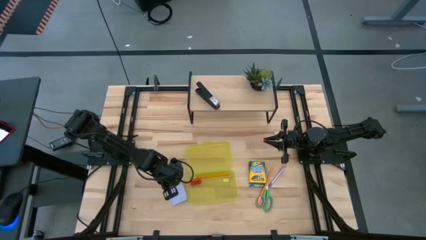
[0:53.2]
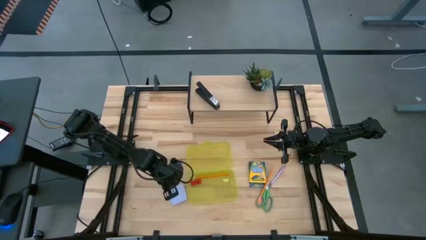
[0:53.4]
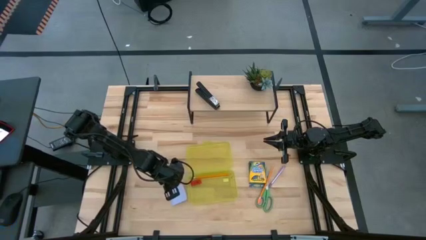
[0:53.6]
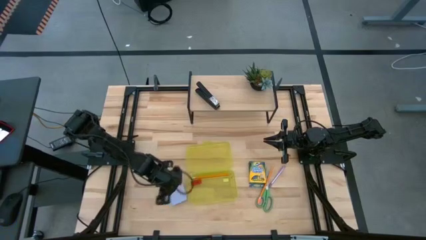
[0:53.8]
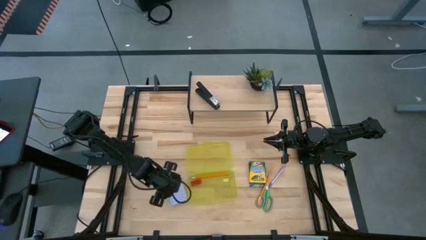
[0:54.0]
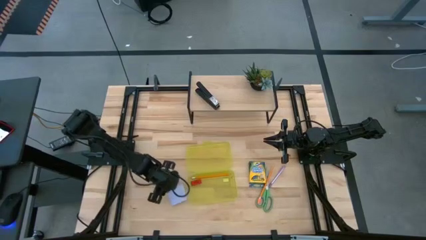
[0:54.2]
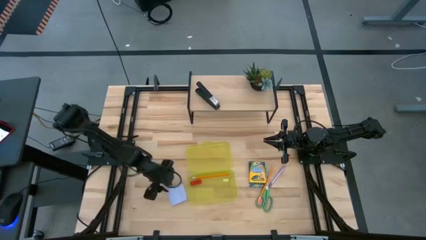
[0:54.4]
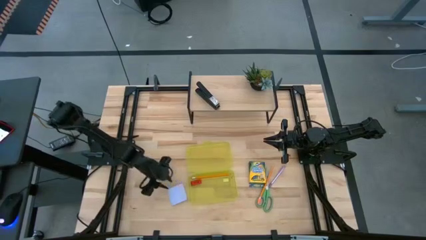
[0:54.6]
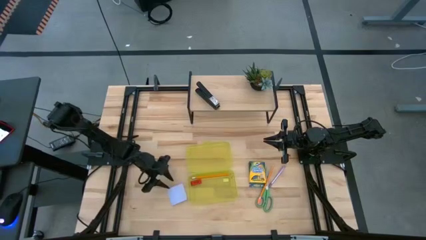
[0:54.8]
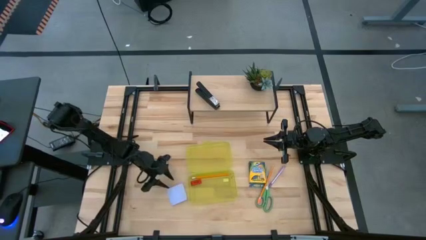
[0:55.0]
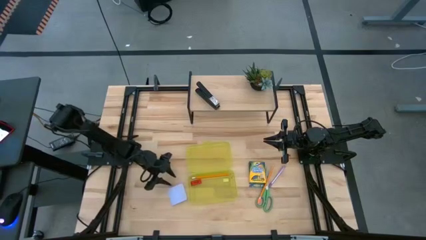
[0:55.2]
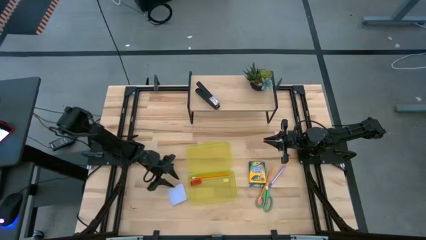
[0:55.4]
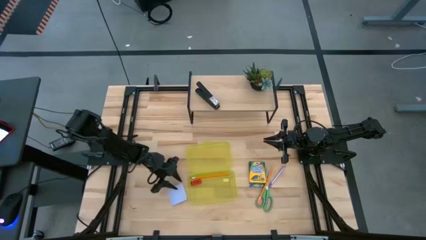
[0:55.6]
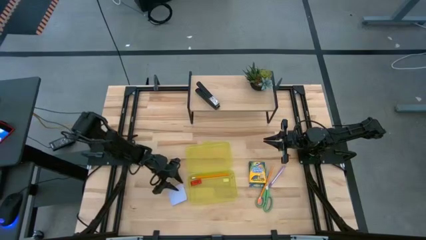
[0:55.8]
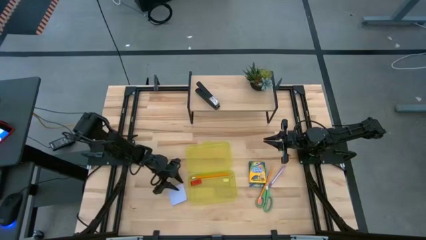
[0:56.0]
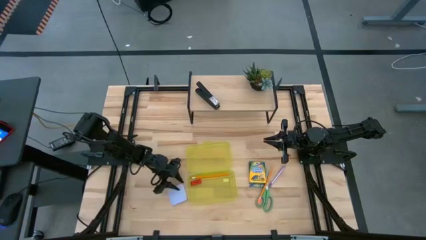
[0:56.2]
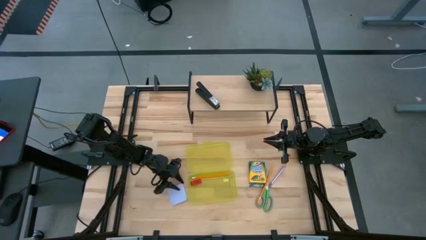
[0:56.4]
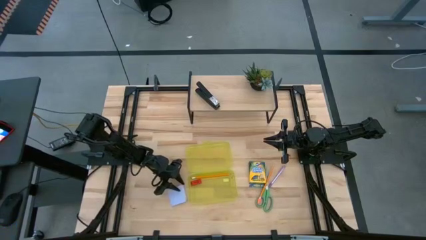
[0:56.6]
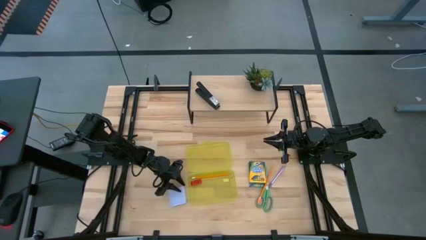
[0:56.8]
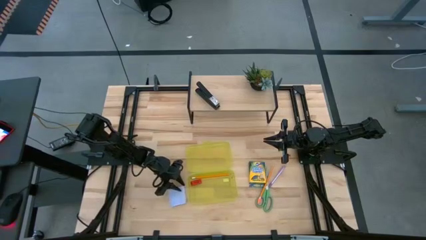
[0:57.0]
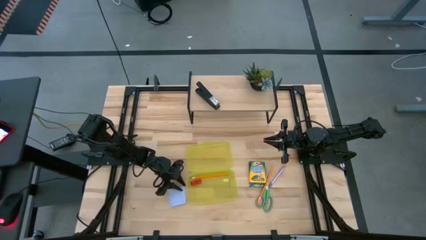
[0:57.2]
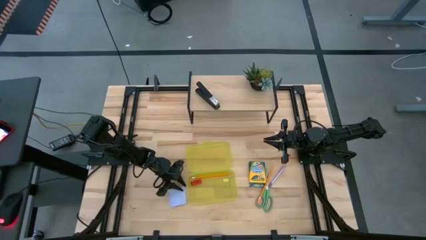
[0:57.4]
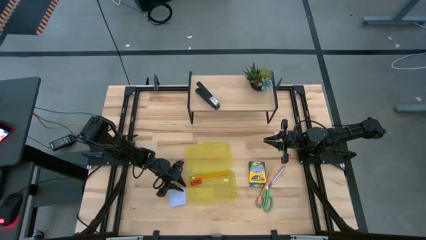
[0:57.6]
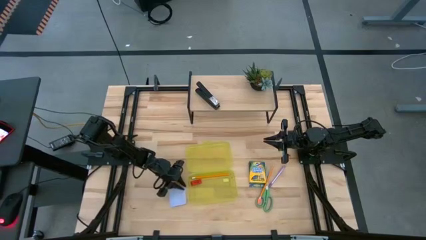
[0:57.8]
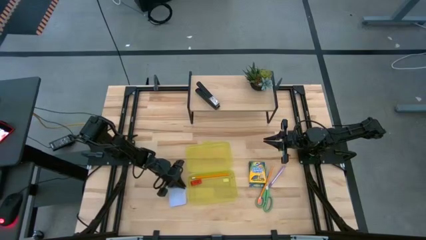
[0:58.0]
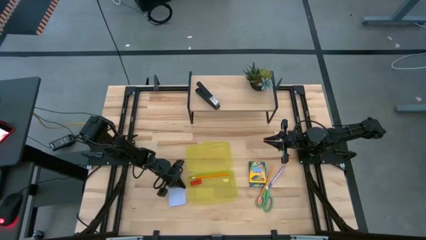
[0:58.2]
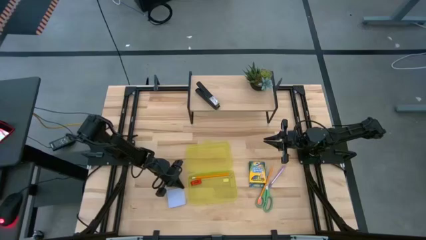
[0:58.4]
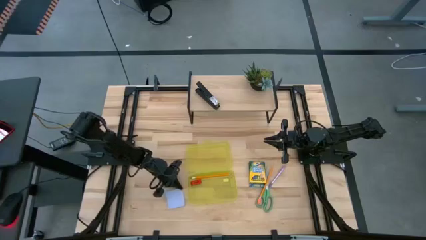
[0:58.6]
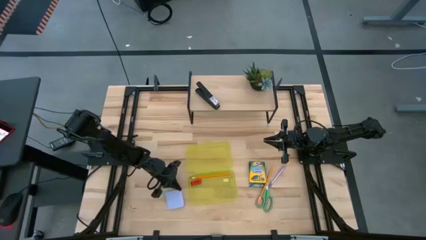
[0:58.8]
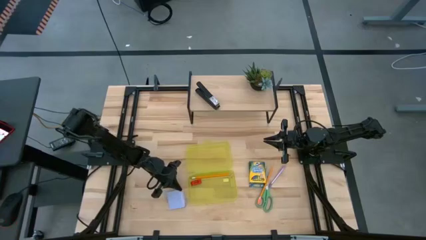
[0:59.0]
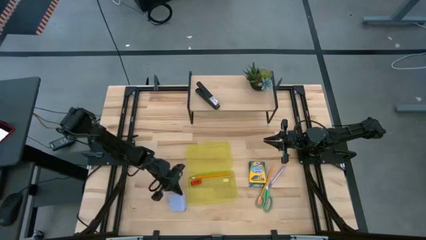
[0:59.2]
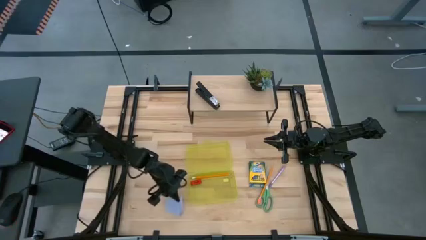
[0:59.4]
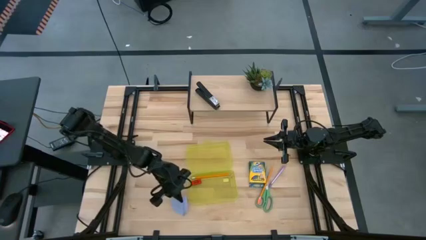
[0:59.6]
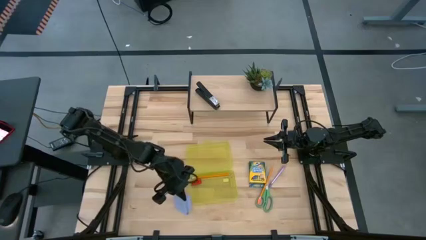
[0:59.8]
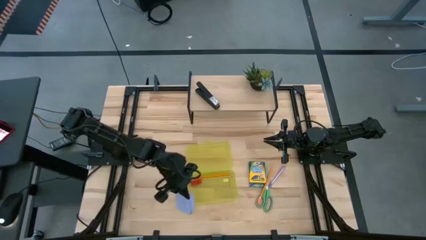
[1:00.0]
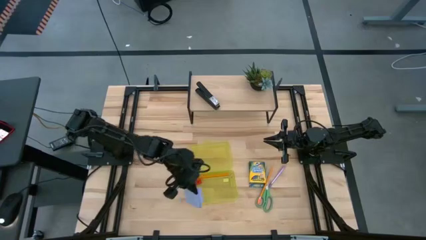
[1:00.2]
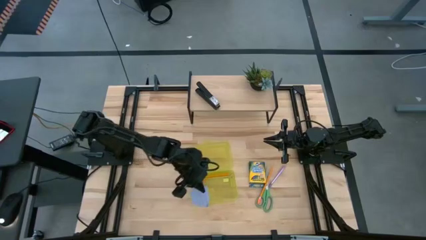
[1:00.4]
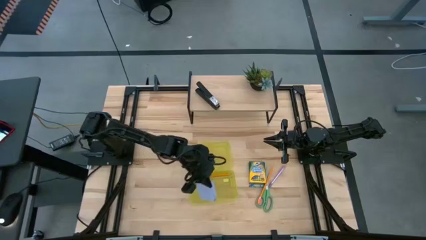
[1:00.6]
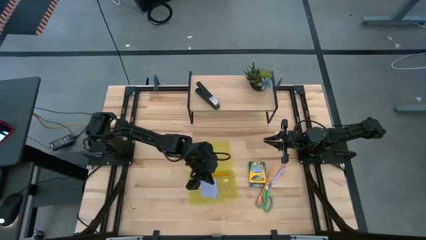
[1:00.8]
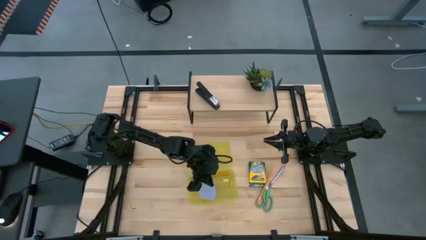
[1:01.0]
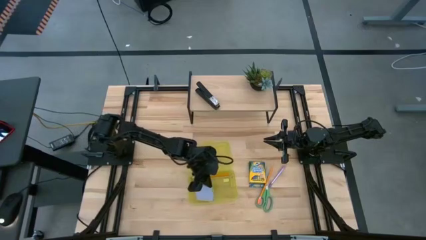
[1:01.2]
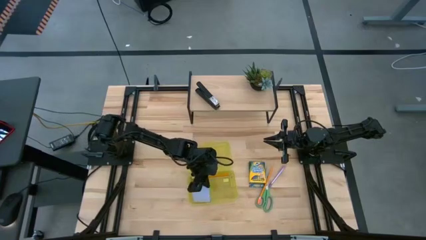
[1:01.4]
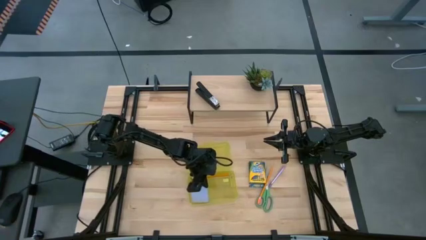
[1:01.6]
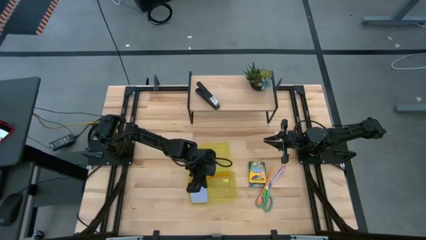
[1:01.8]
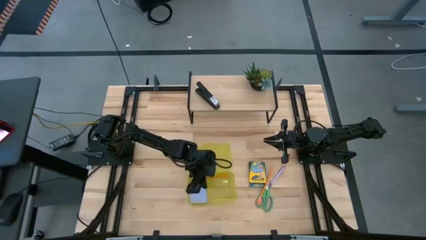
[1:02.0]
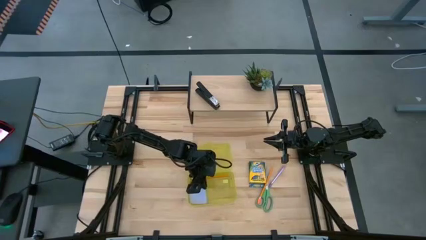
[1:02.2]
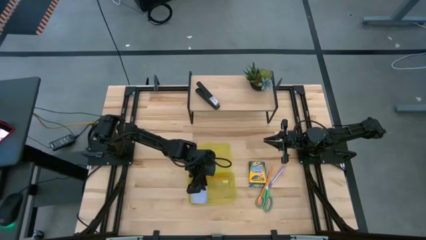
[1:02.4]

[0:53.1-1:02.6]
Task: Pack school essentials
Put the blue sticky note into the yellow supply box
